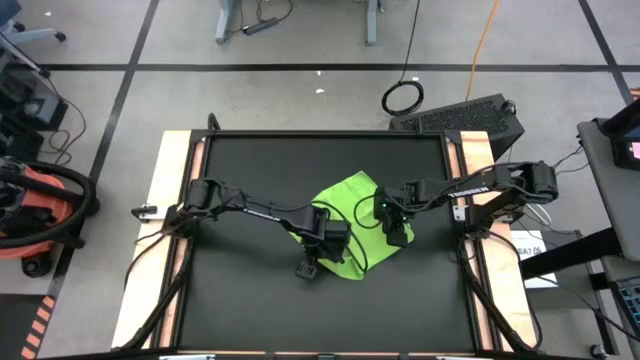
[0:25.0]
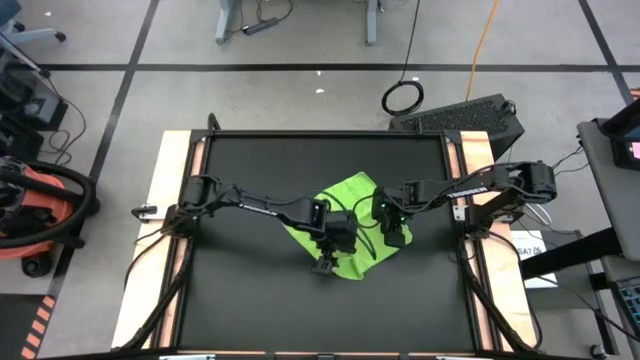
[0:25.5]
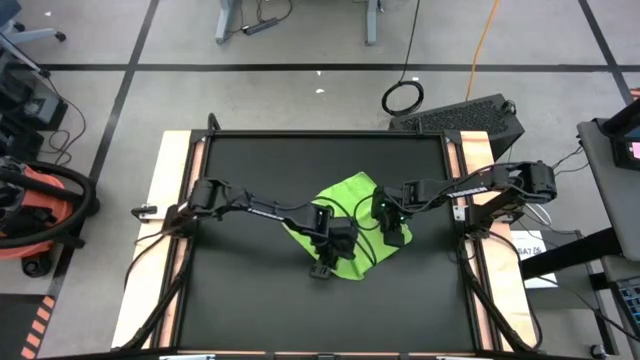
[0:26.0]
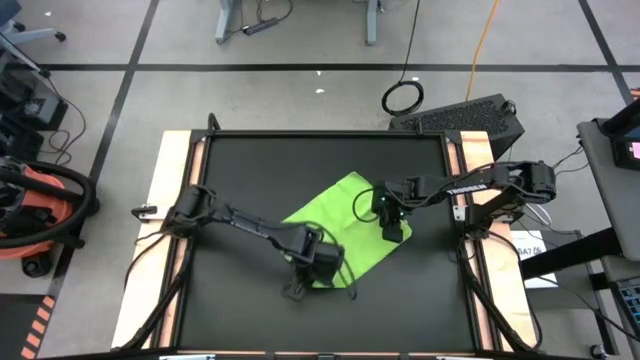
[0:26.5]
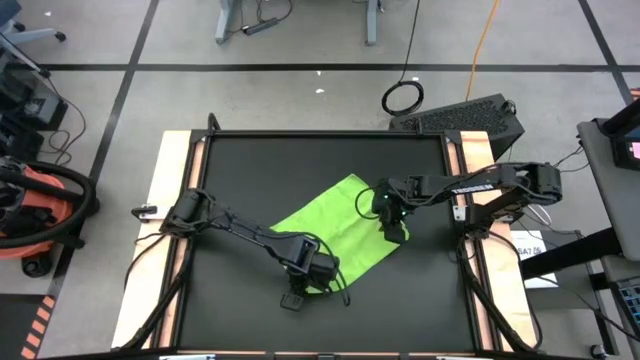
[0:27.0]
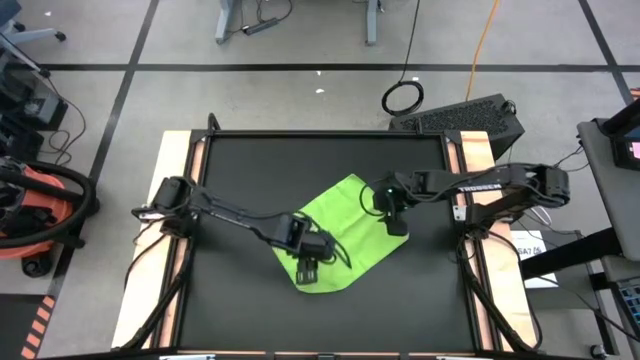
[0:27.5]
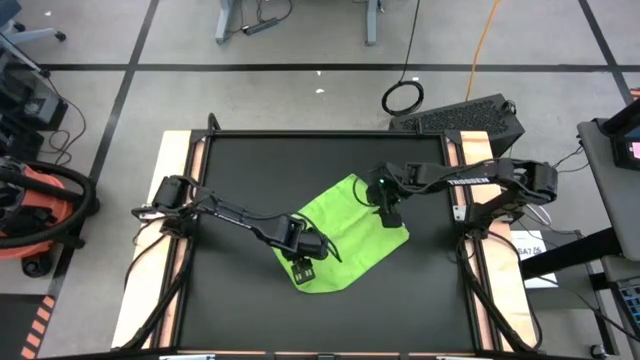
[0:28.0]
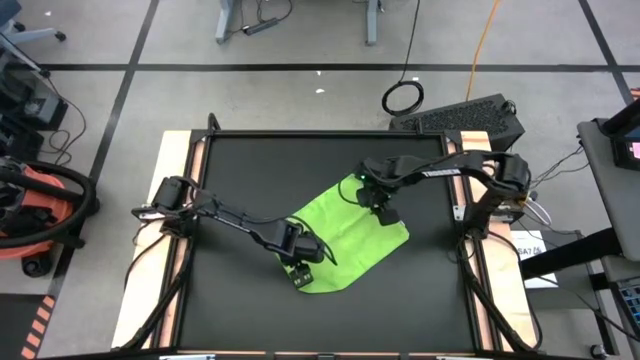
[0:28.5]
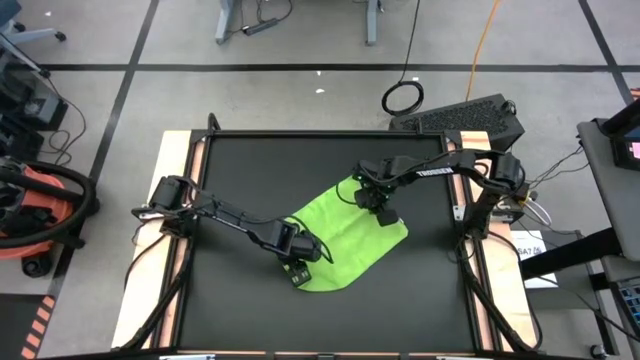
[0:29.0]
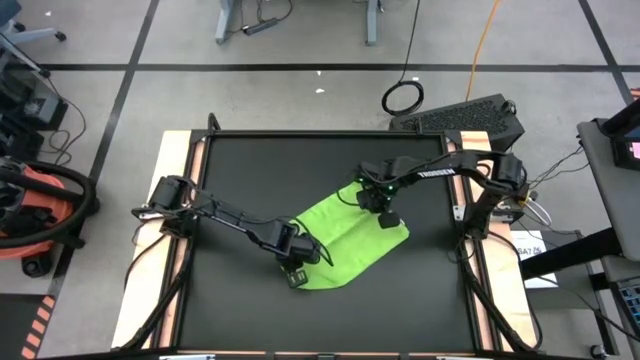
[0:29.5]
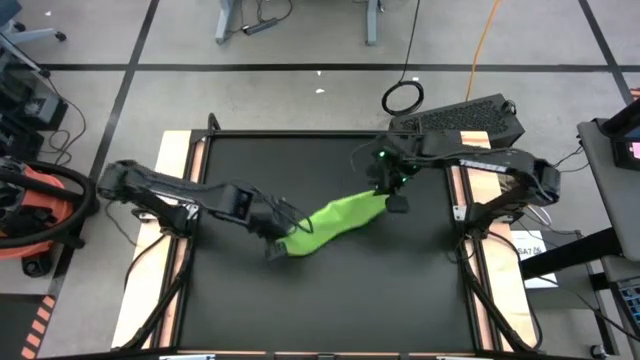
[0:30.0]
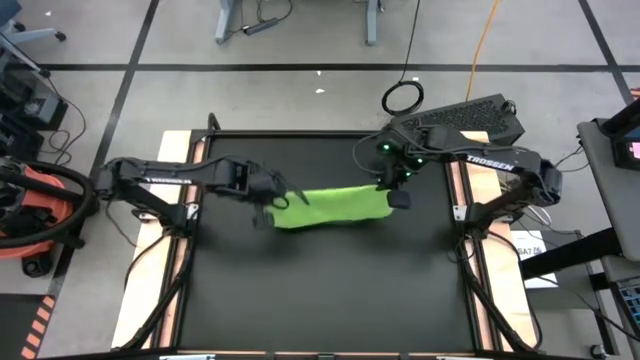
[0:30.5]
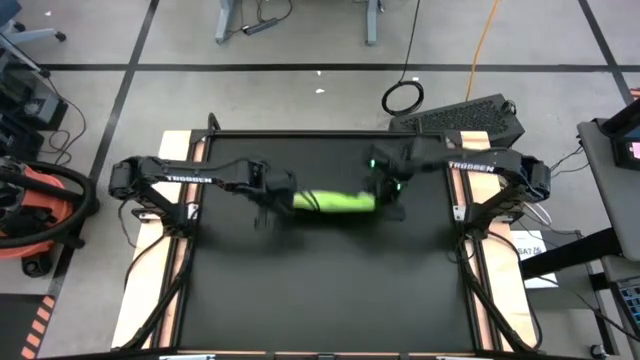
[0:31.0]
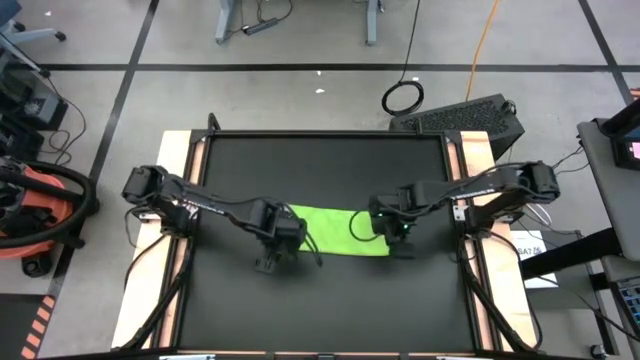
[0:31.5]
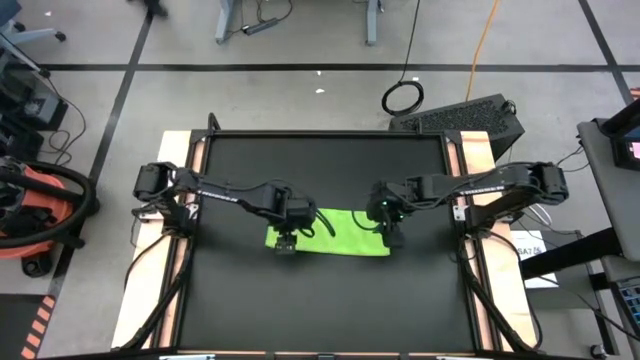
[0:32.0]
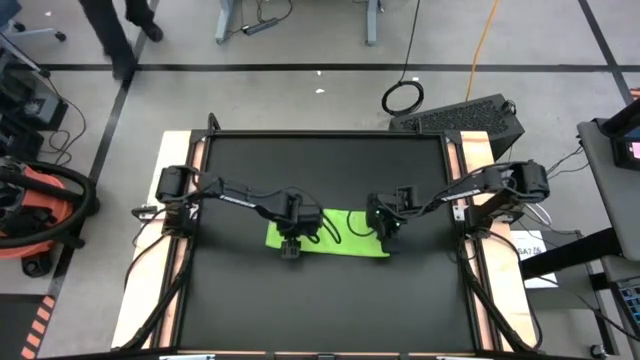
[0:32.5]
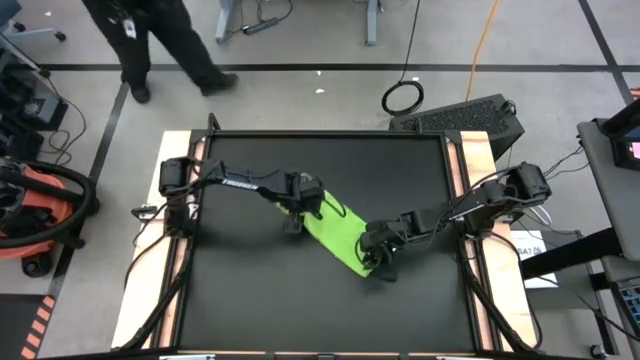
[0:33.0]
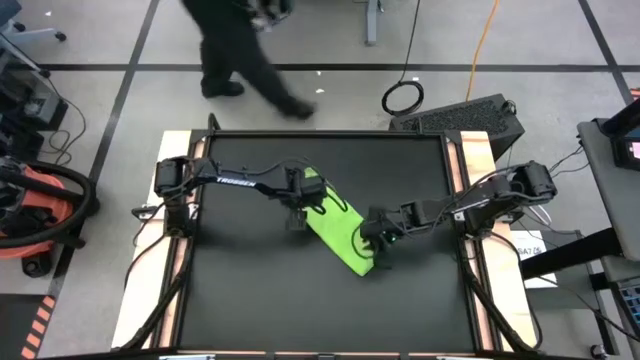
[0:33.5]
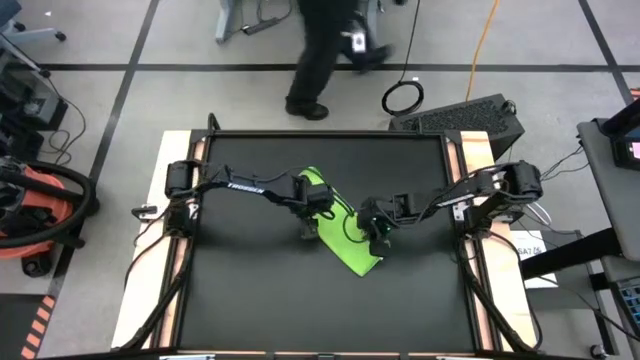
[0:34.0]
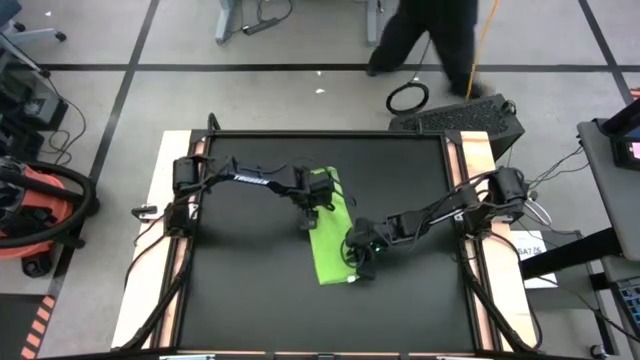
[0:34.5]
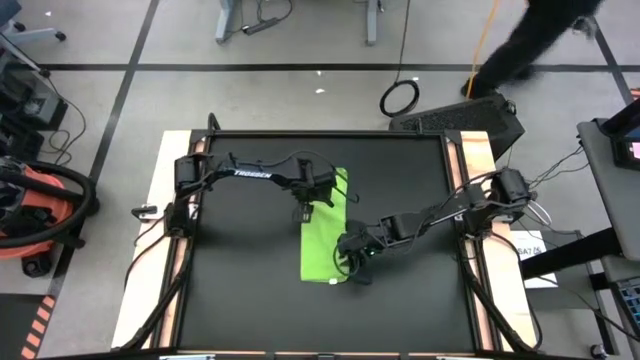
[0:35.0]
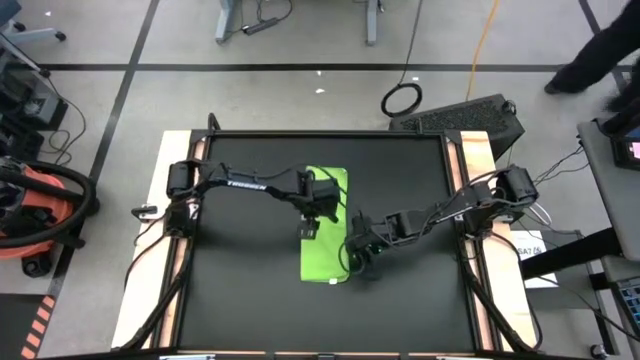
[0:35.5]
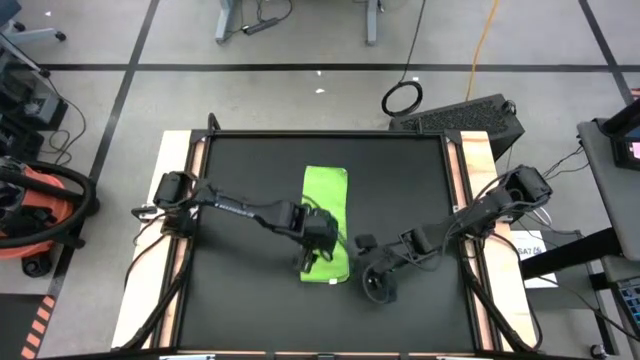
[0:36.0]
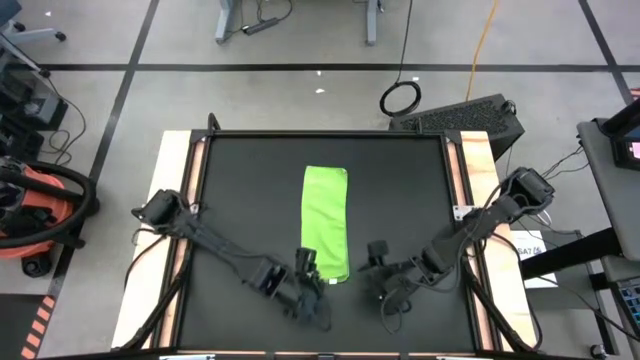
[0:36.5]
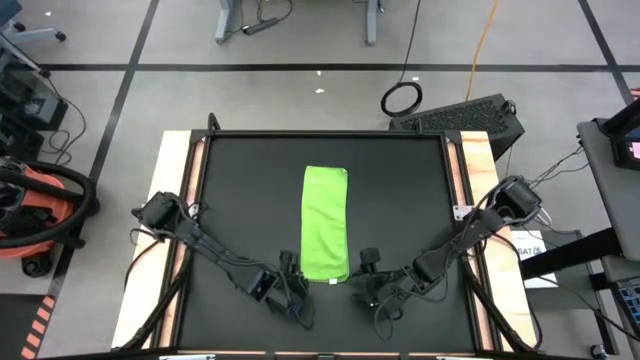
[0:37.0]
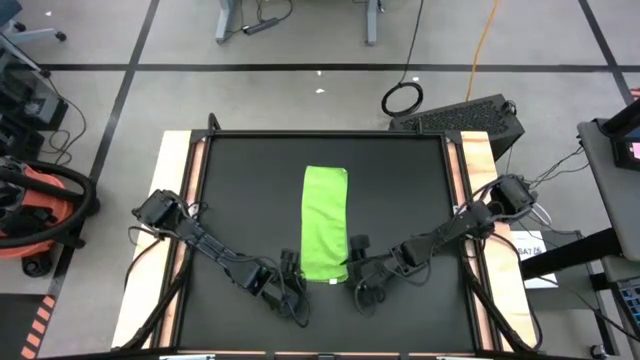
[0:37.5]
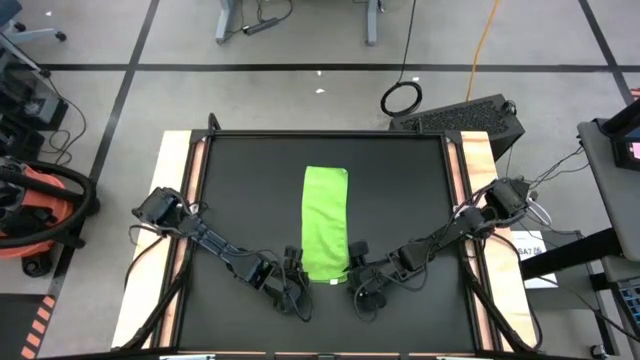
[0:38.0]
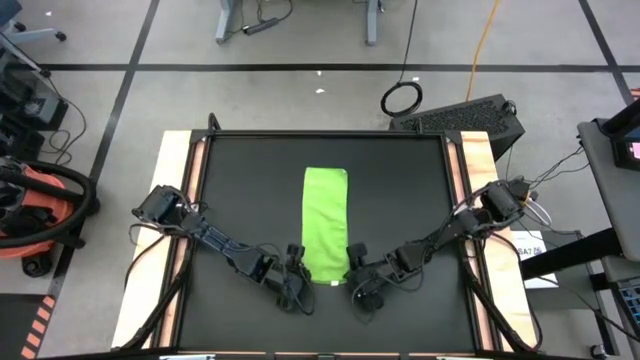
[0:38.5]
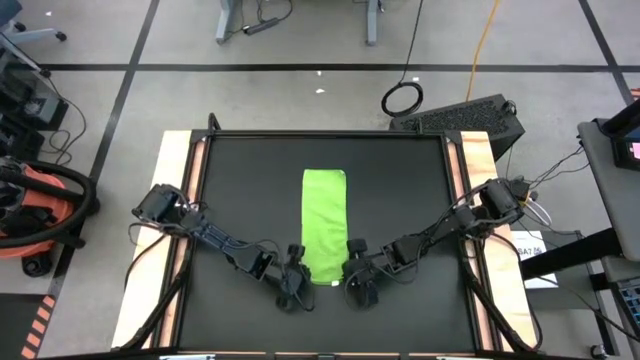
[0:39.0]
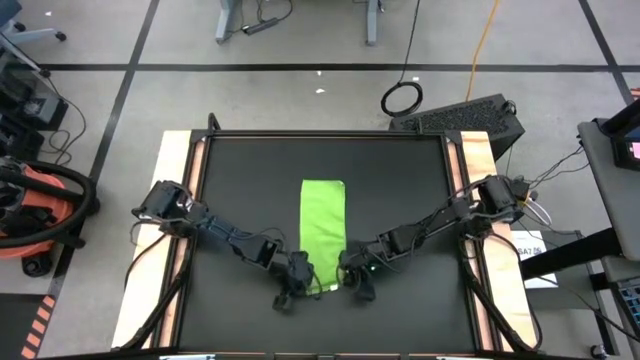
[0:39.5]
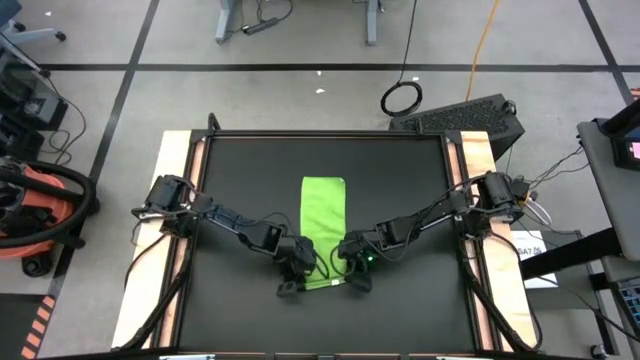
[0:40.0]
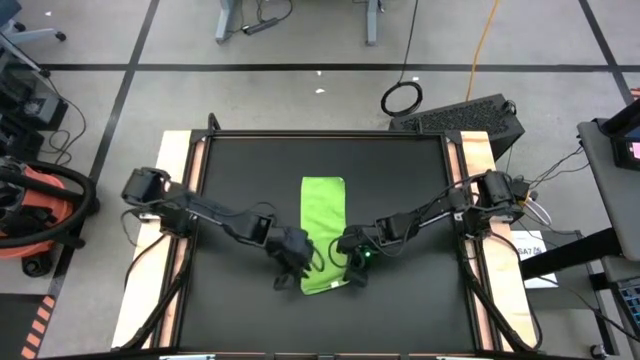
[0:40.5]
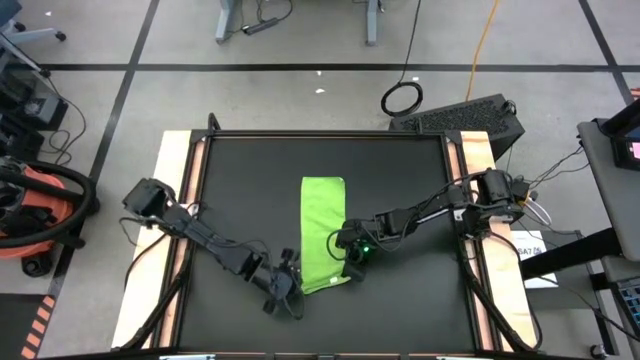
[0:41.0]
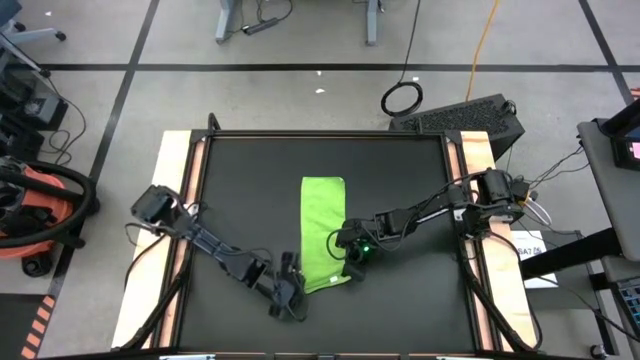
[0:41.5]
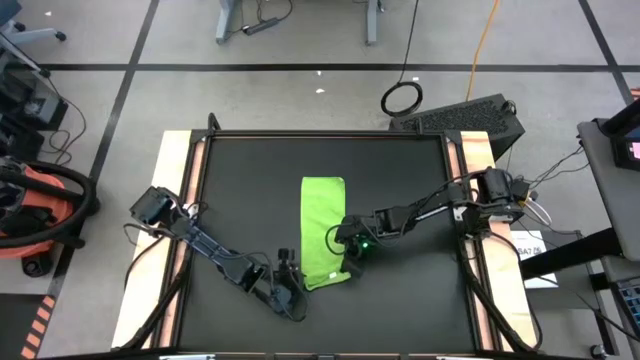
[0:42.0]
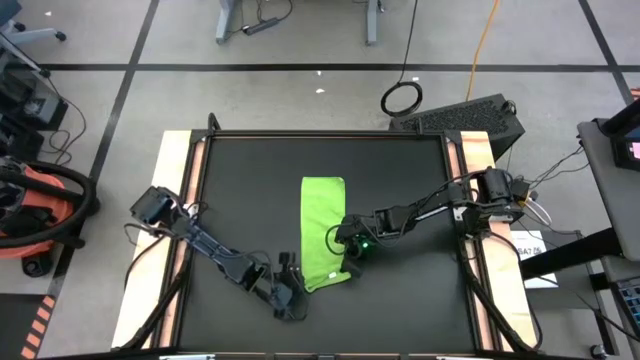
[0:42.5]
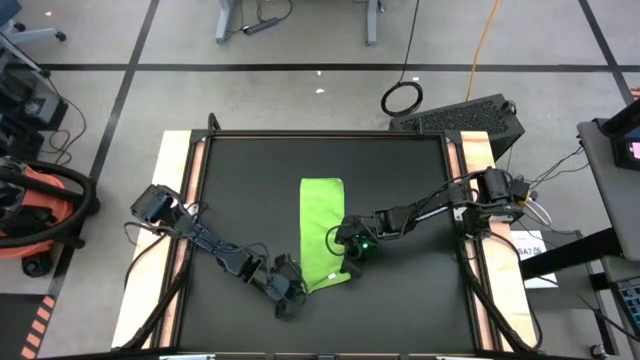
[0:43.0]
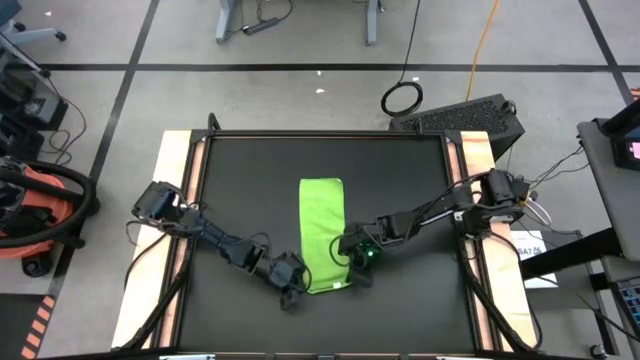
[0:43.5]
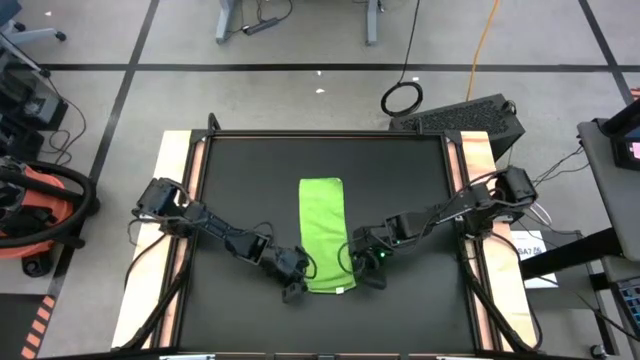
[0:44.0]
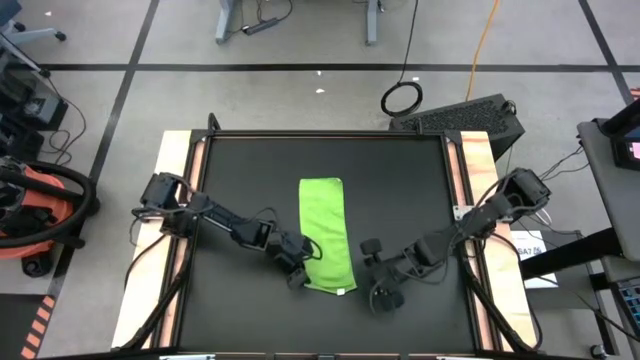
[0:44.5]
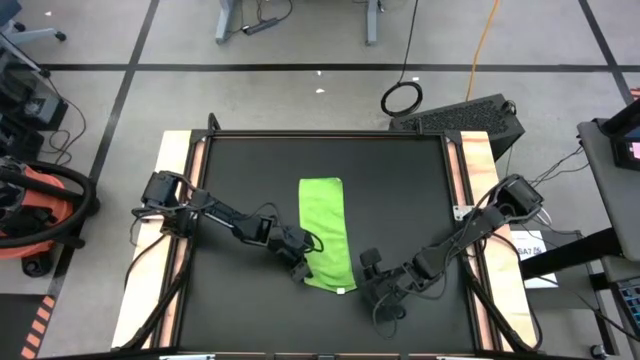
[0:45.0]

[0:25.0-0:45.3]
Task: Roll towel
Roll the green towel

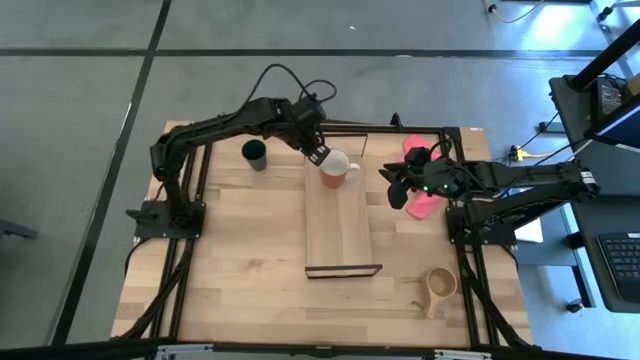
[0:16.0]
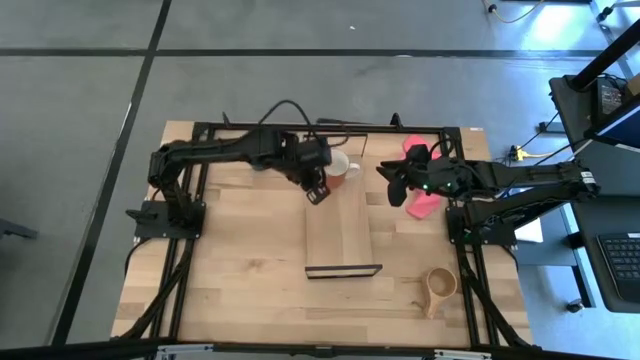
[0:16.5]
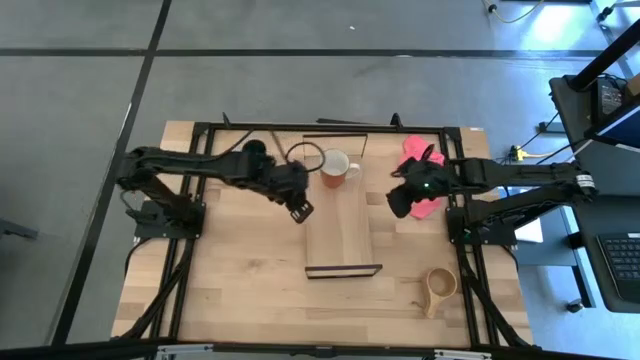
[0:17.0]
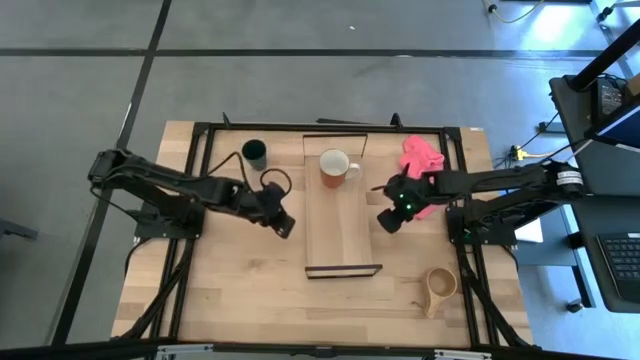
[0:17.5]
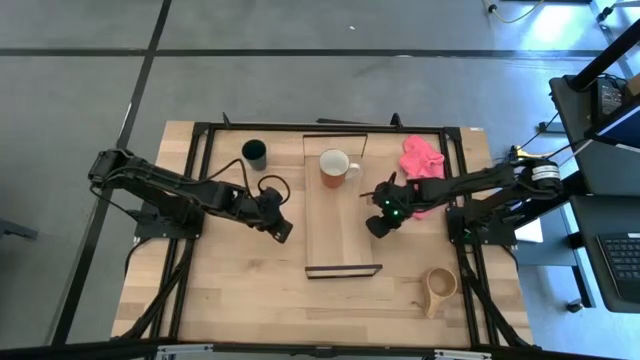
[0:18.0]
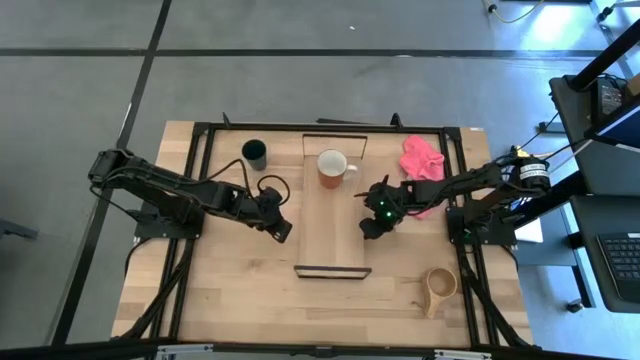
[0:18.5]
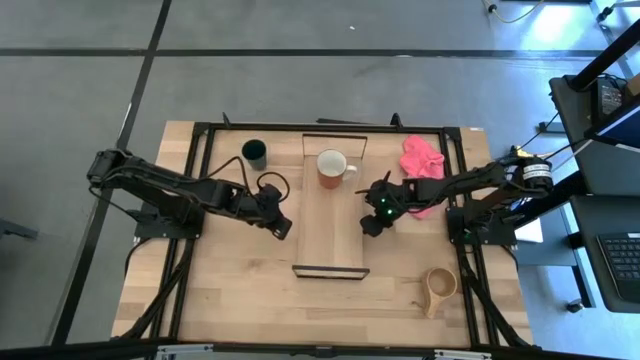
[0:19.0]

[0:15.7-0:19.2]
Task: Stack small to large cups/mugs on shelf
Adjust the shelf on the table
